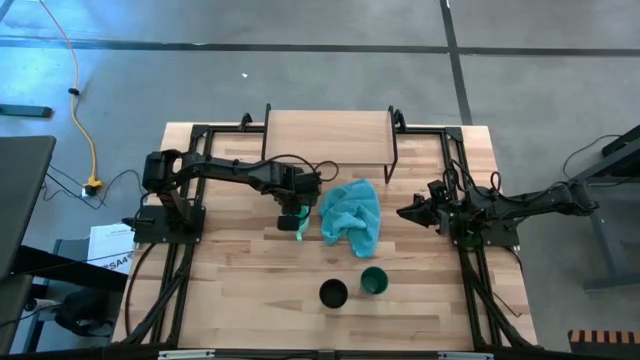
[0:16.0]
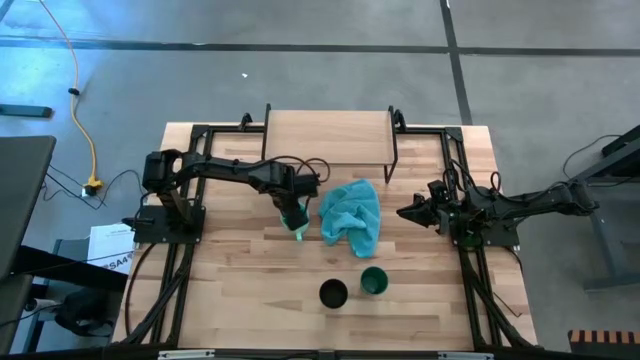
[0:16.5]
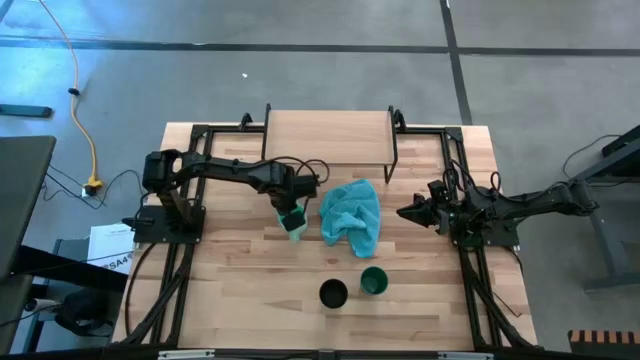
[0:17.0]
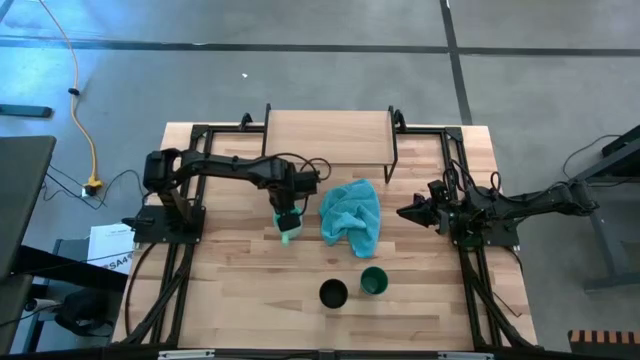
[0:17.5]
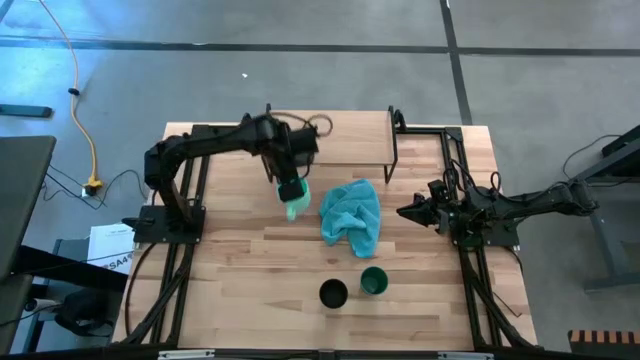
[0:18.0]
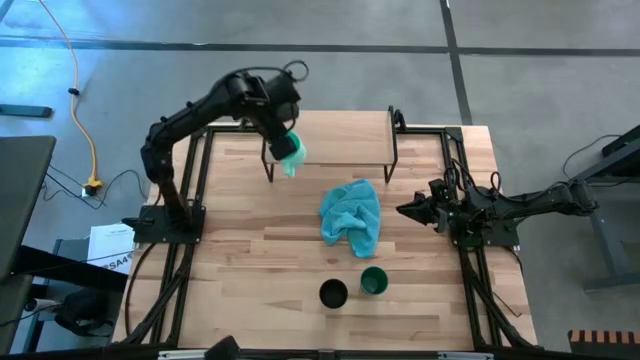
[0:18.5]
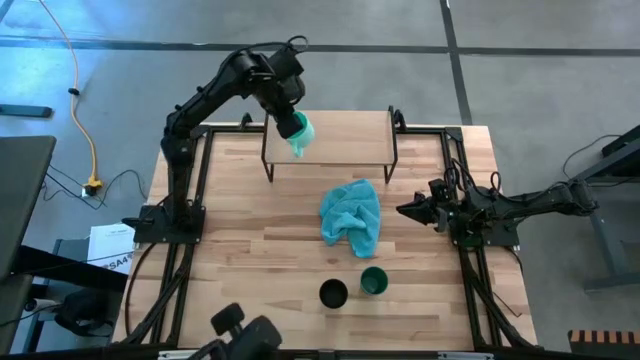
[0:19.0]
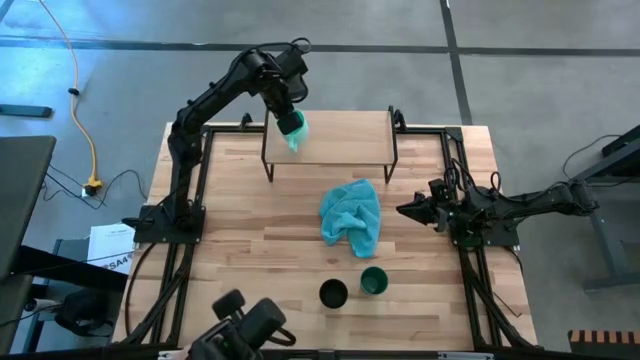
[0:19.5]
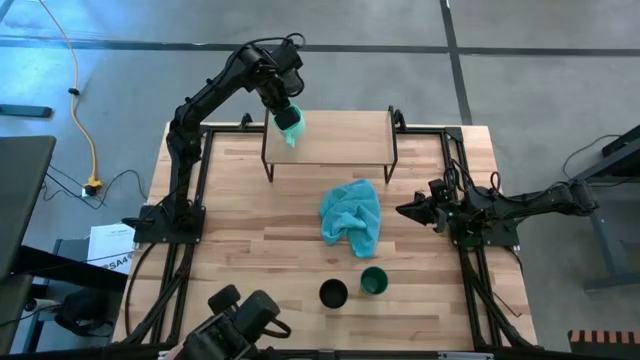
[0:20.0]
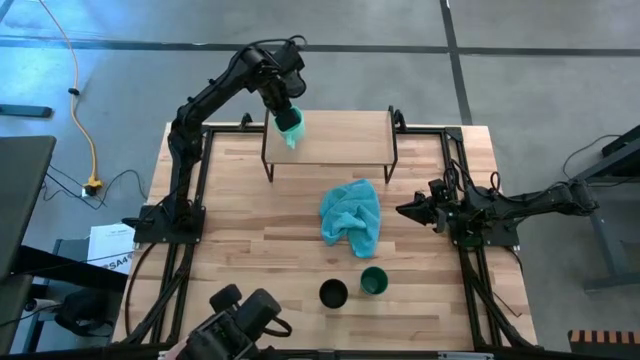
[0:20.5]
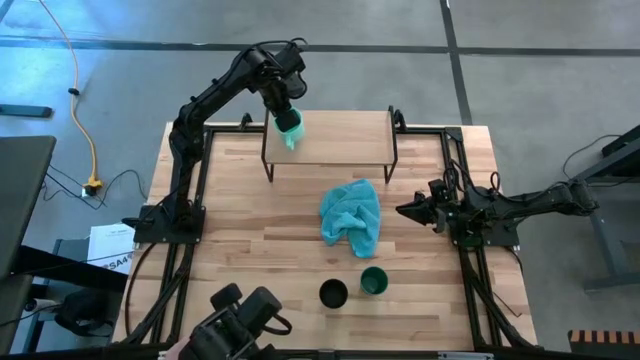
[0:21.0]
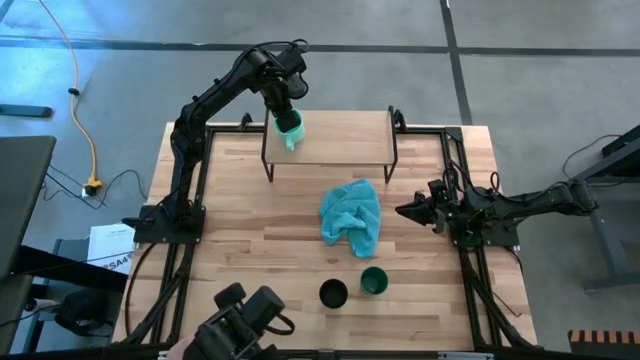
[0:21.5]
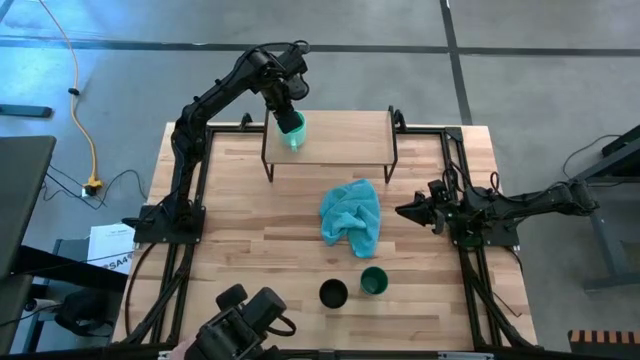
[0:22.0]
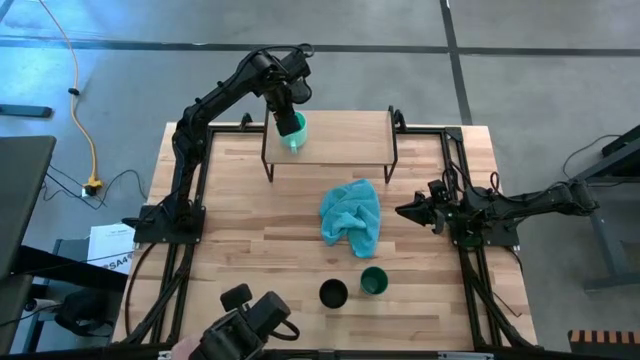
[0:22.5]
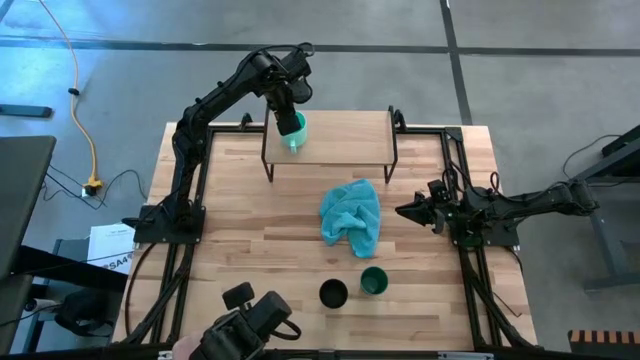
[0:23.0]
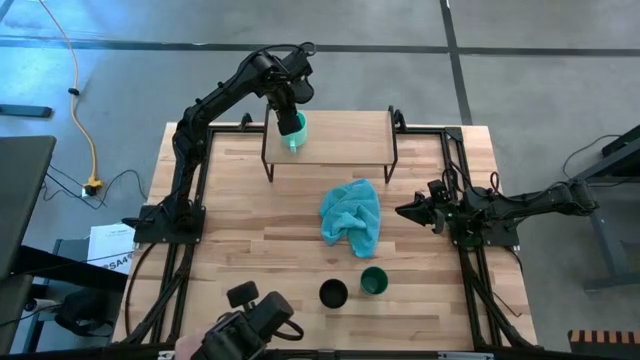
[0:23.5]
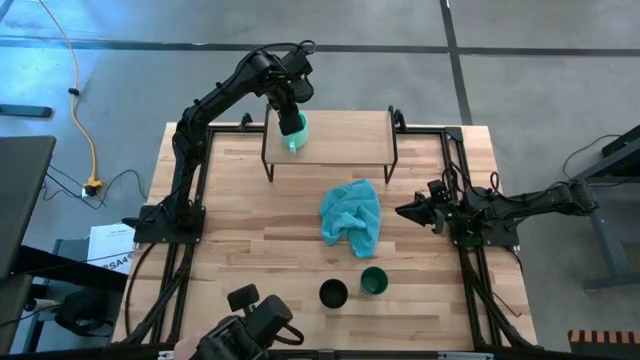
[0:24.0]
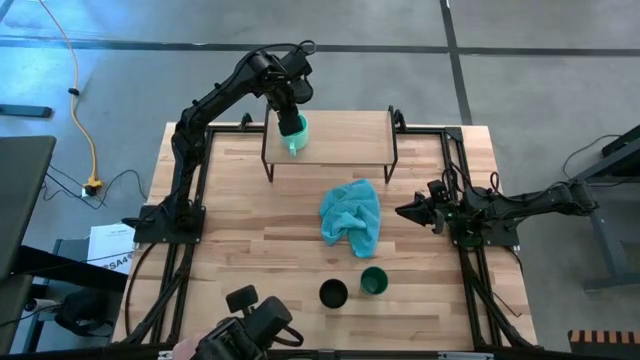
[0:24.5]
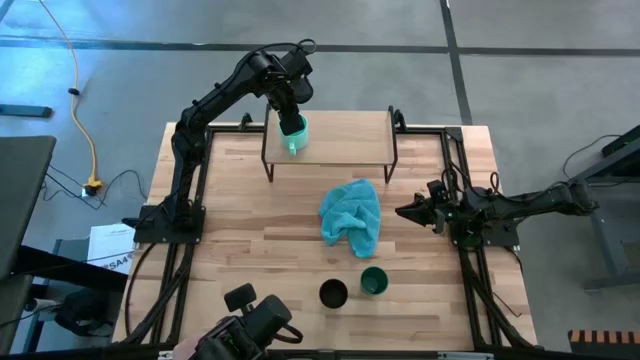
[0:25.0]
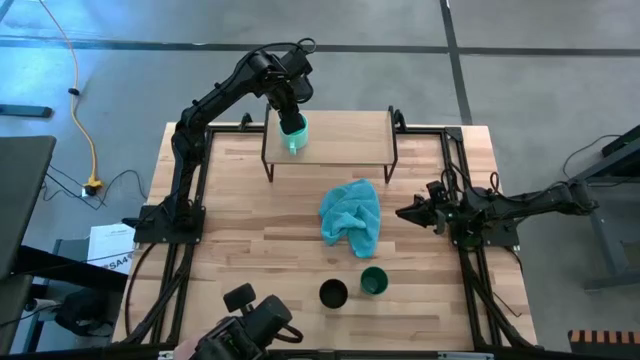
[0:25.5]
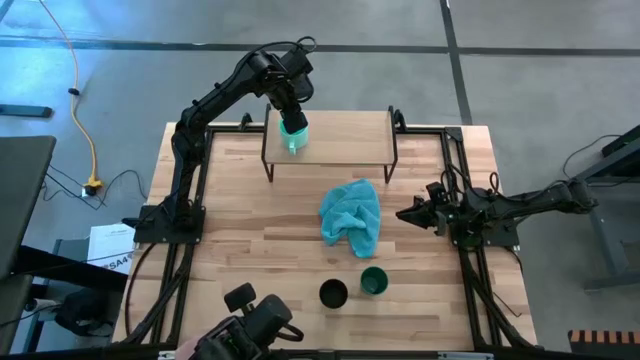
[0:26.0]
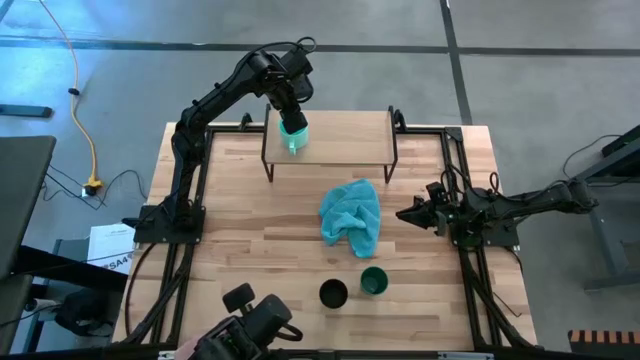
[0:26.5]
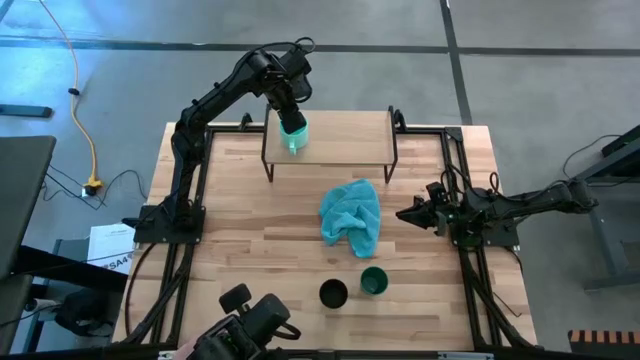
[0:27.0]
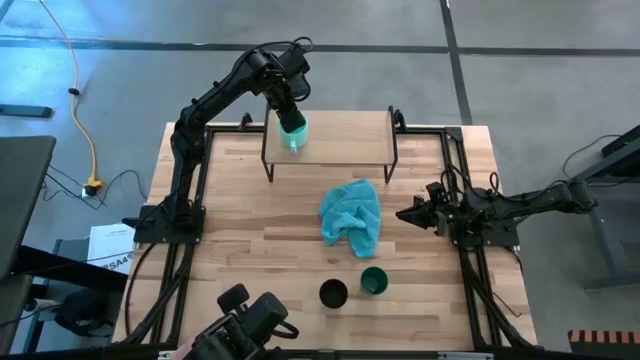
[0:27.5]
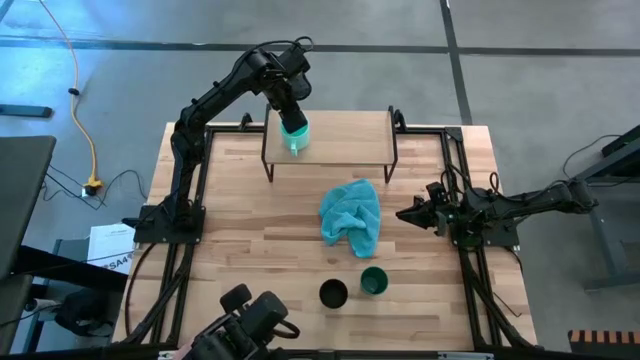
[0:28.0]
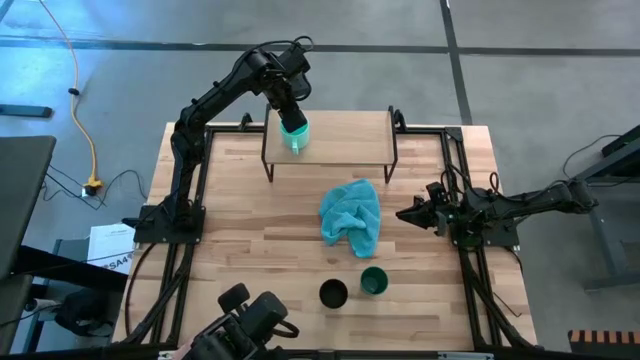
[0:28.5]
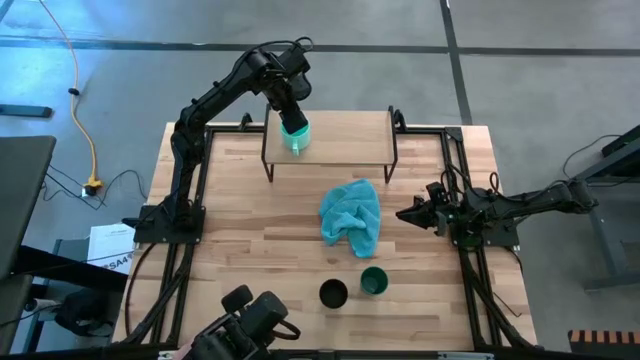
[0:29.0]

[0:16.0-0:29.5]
Task: Stack small to large cups/mugs on shelf
Put the light blue mug on the shelf
